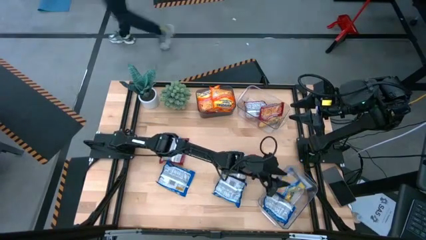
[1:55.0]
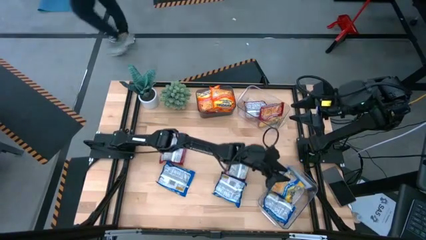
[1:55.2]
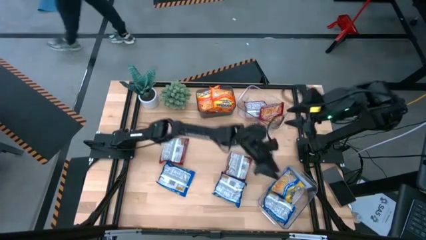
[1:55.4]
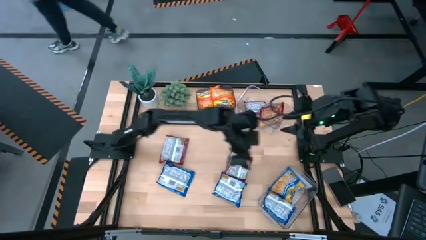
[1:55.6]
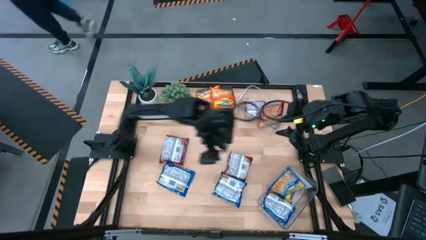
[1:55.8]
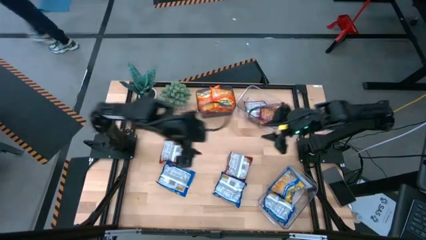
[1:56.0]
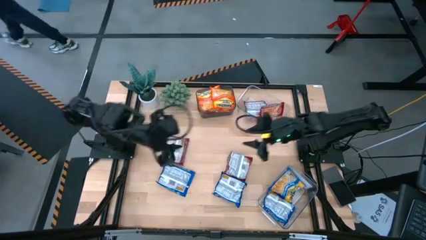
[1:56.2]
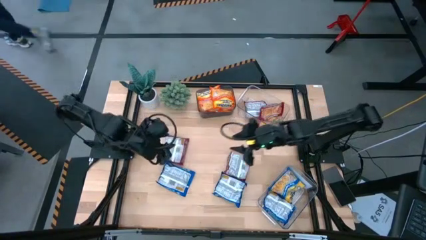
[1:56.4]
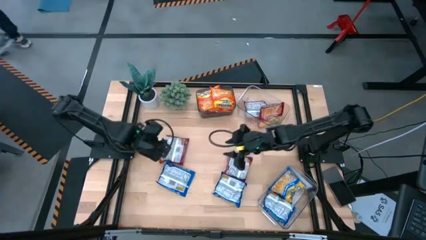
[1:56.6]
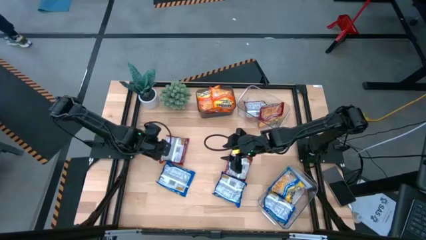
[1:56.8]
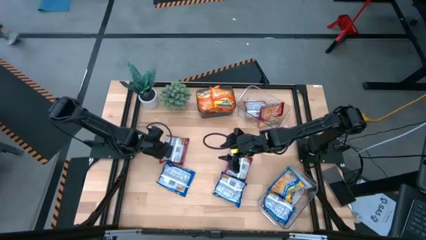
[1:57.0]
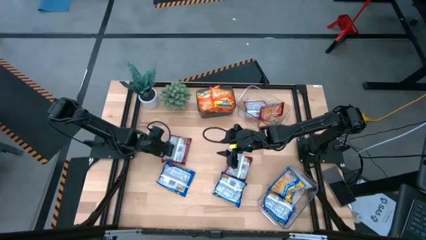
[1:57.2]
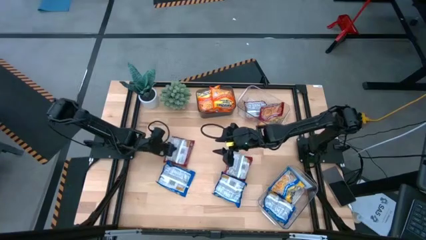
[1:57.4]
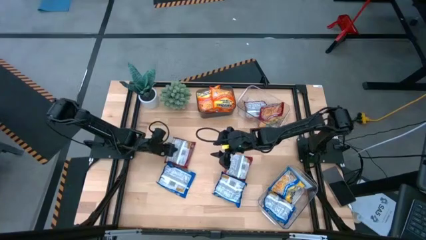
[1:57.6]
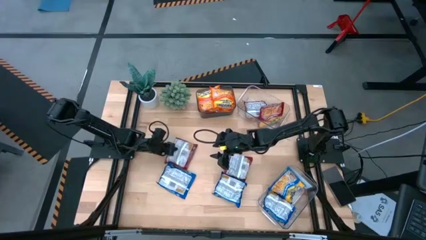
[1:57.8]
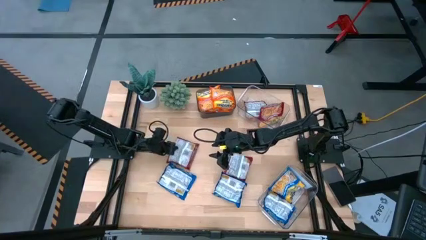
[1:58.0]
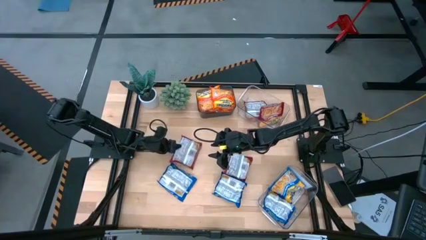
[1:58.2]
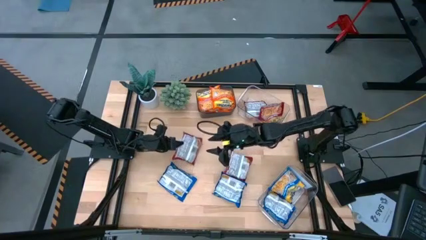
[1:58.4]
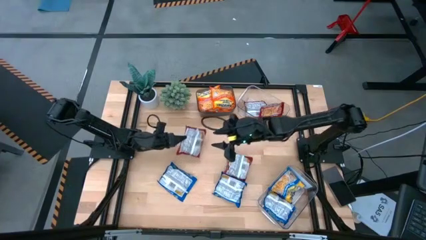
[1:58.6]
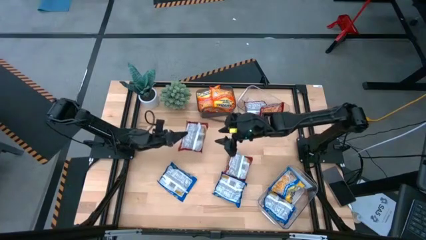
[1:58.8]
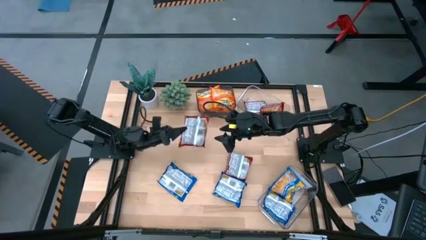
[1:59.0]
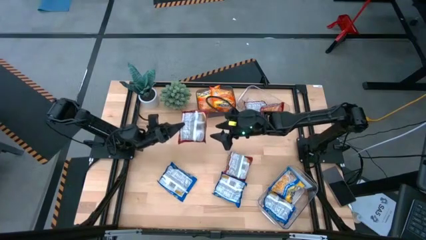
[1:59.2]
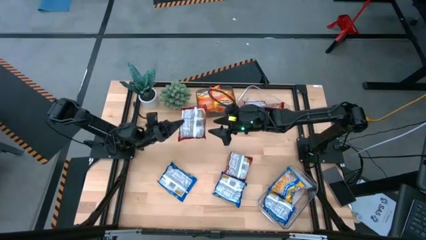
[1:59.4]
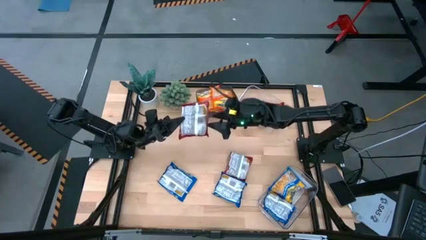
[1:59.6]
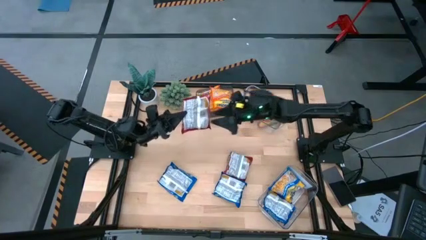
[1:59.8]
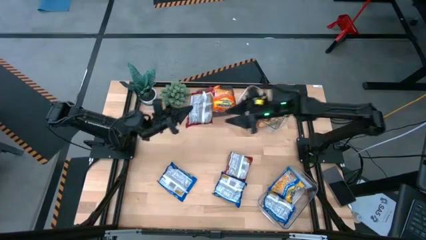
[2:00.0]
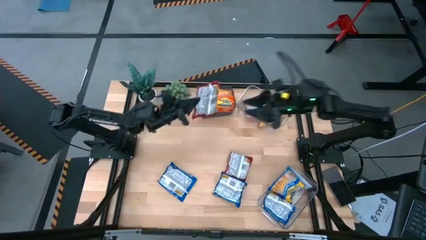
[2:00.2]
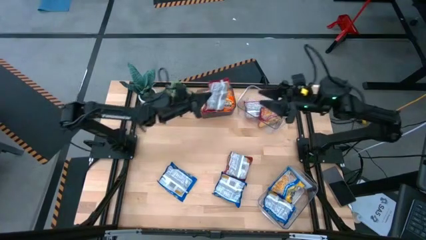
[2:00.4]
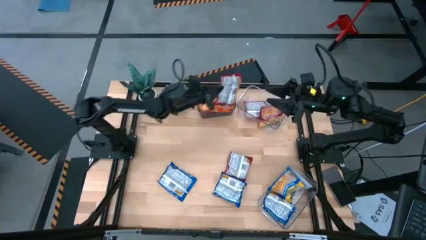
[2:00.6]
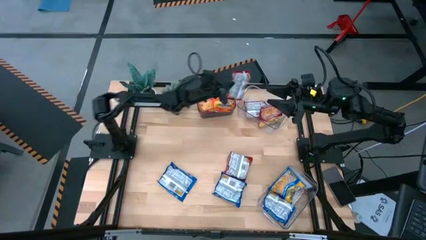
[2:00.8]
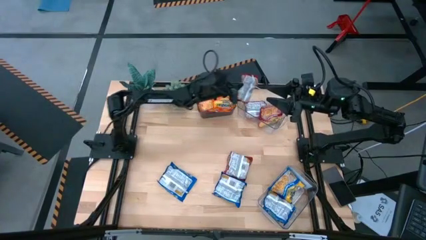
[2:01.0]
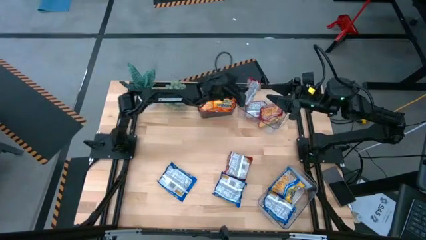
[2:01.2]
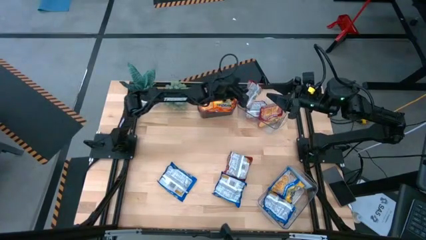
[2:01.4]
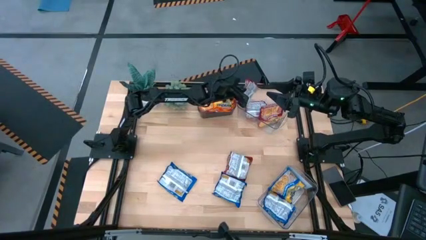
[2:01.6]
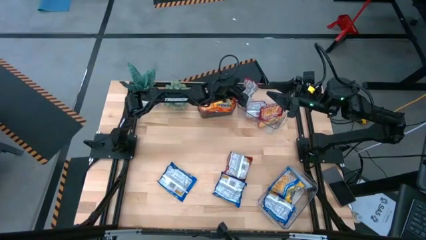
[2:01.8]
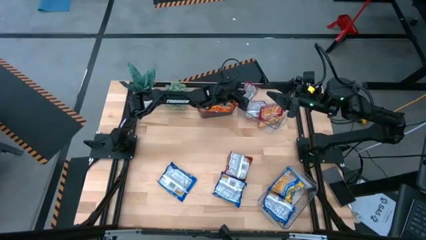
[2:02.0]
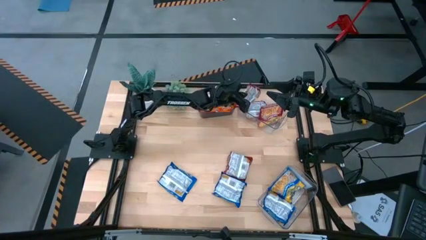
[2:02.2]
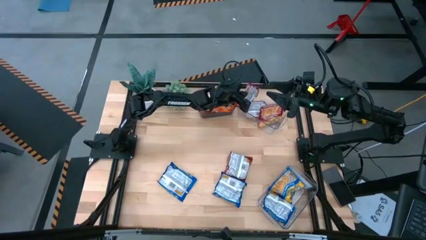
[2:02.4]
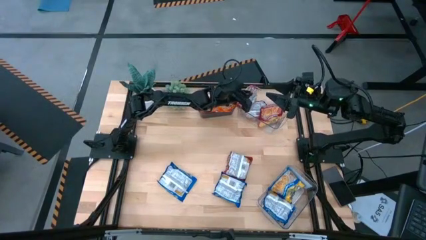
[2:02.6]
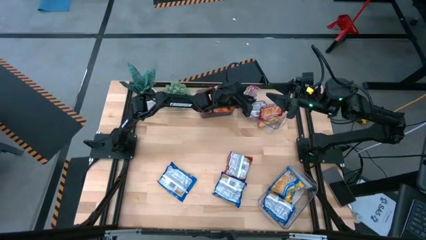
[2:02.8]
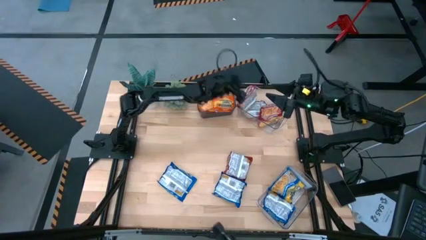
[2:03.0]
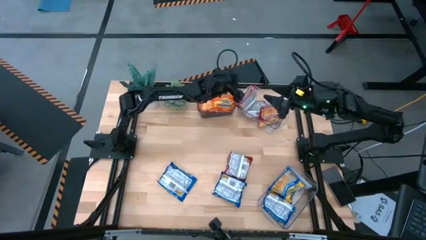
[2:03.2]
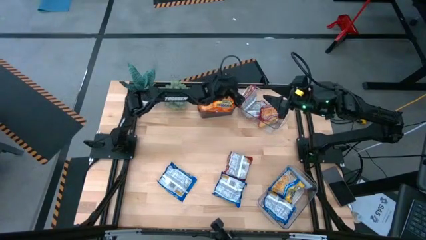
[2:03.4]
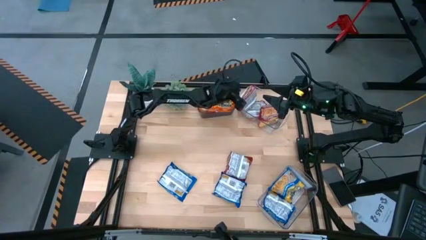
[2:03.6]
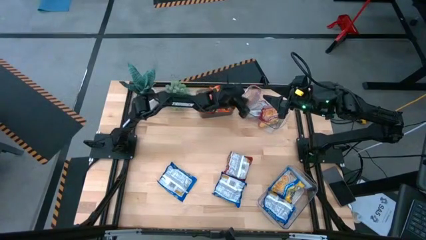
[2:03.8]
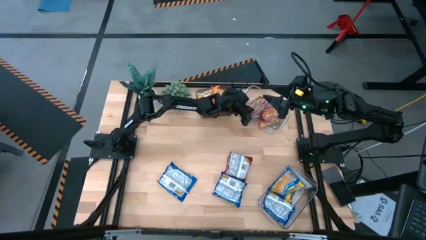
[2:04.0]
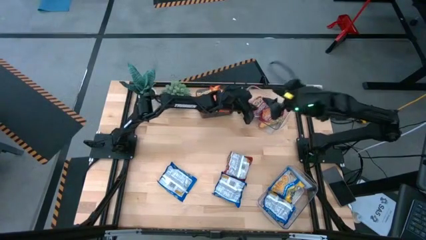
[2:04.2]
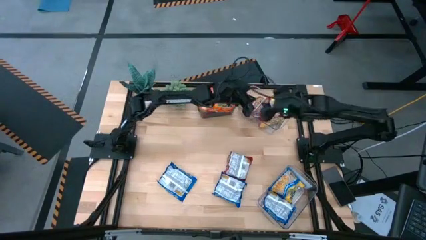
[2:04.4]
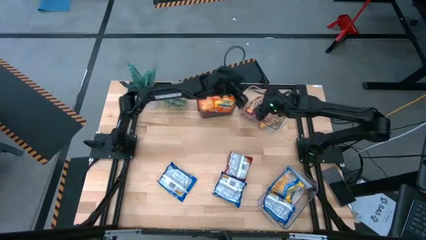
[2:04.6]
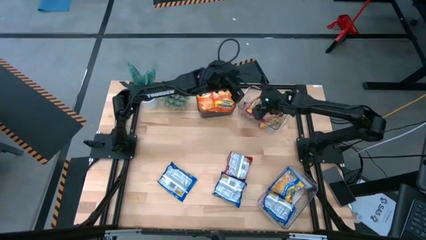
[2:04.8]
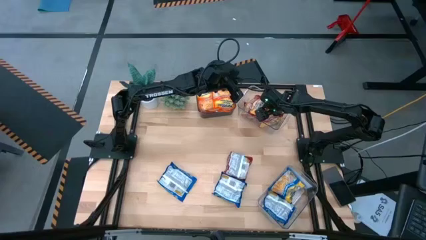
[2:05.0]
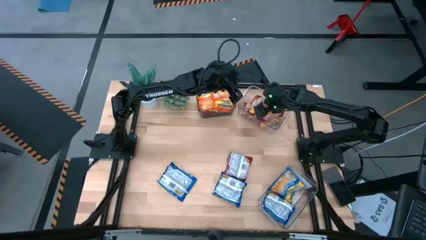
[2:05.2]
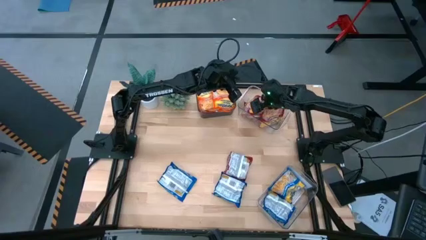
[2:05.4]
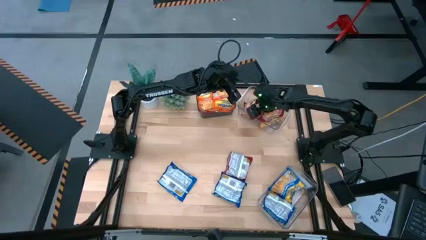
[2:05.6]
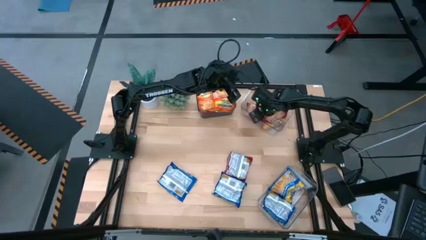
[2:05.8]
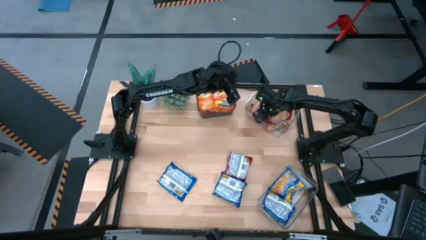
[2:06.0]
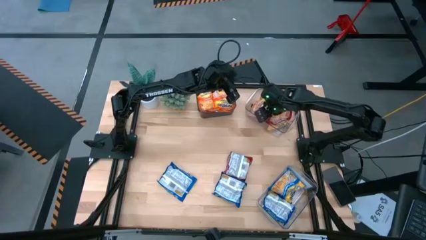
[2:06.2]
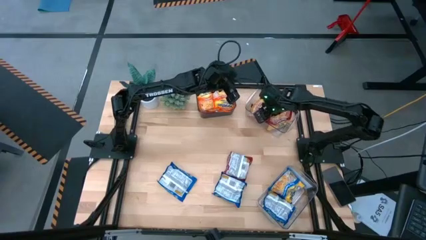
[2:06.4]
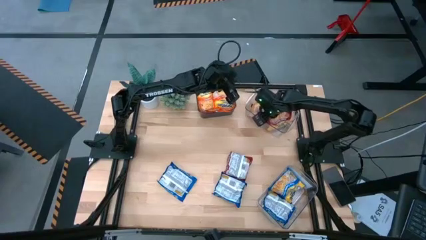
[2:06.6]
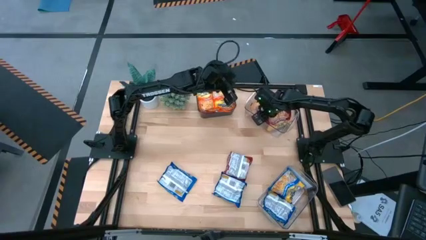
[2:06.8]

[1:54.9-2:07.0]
Task: Sort Maruchan noodles
Put the red noodle pack into the top transparent bin

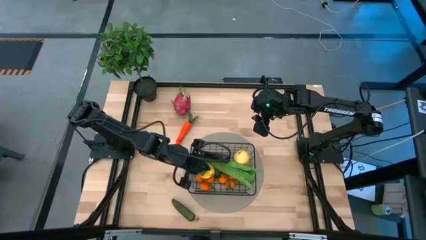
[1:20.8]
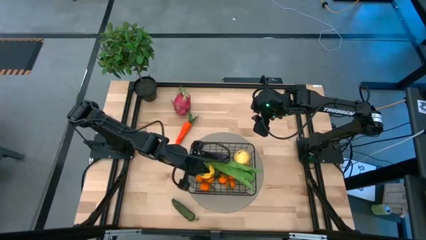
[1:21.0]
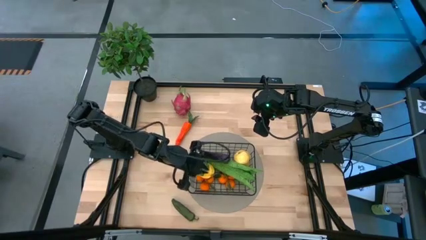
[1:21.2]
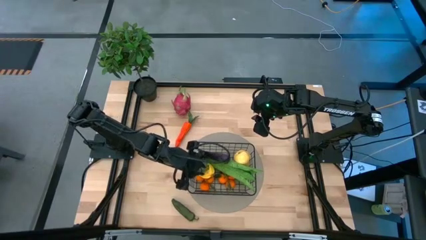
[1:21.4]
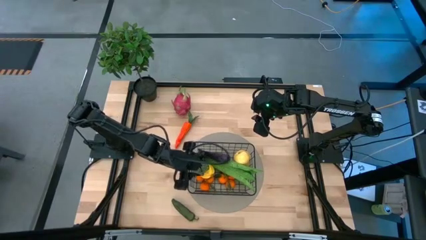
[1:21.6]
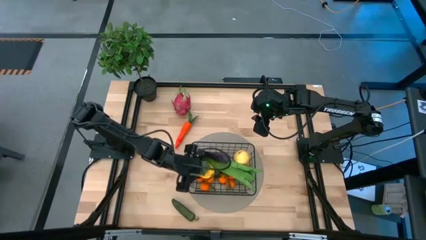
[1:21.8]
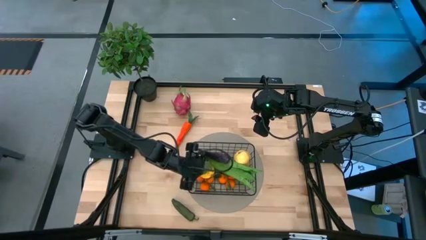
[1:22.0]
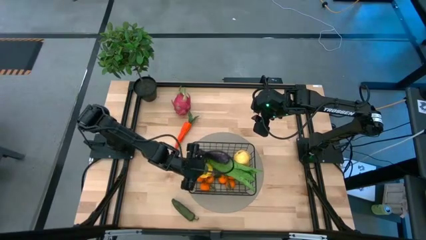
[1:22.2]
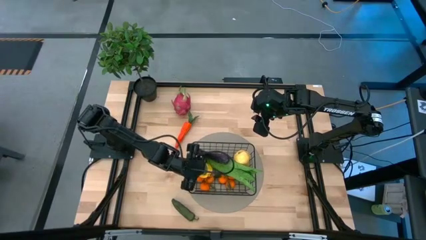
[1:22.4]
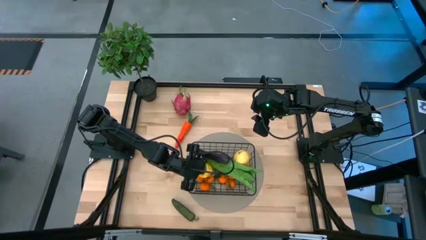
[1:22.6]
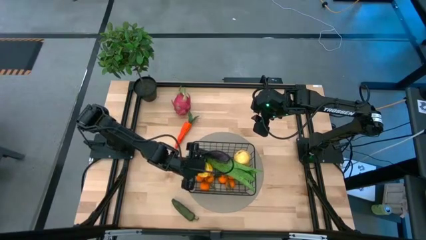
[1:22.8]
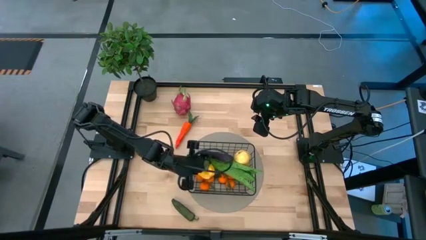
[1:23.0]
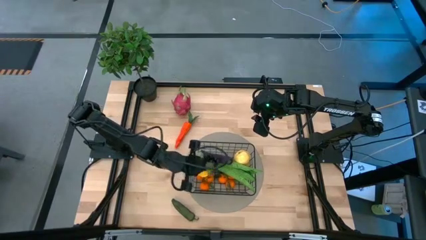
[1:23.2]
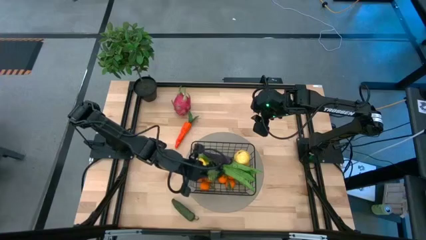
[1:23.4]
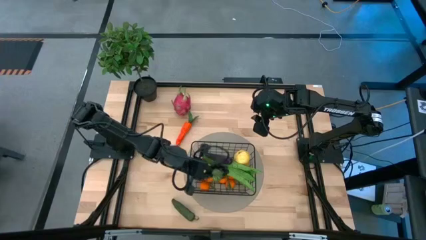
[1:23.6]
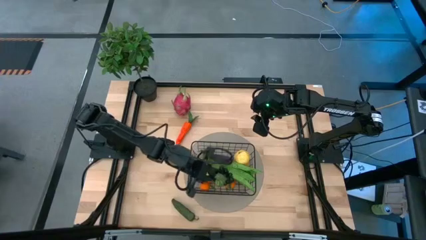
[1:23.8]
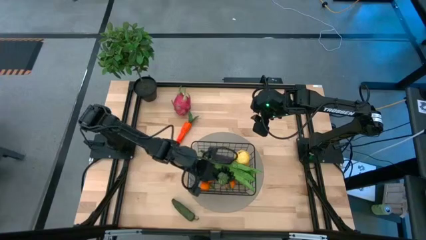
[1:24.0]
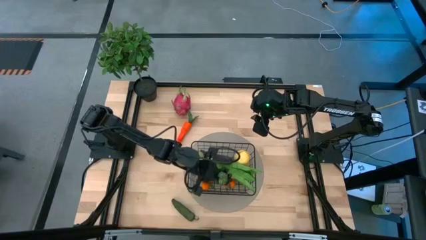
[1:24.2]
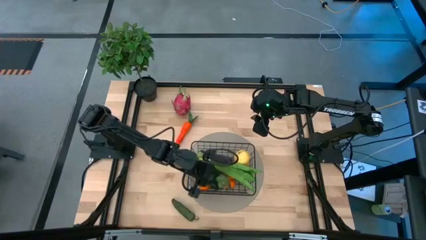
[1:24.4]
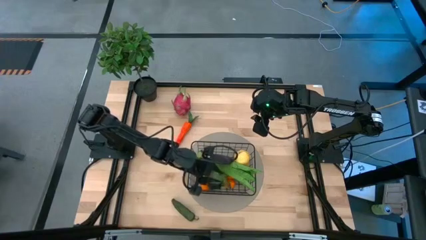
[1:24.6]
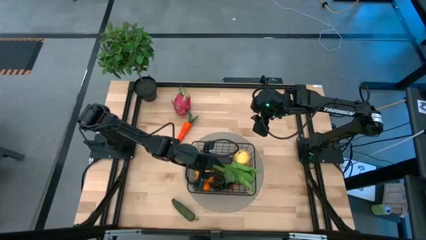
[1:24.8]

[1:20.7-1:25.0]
Task: Build produce basket
Adjust the grapes
